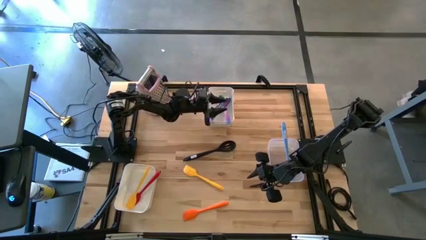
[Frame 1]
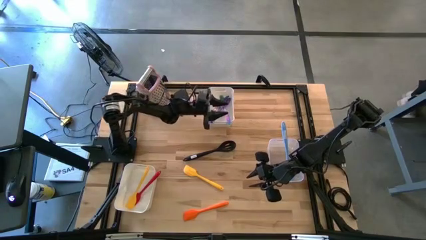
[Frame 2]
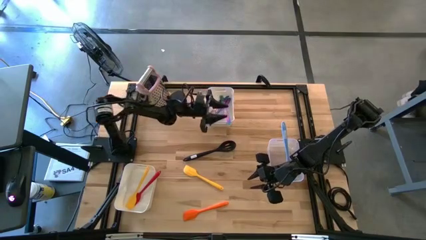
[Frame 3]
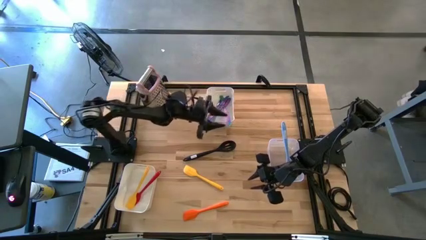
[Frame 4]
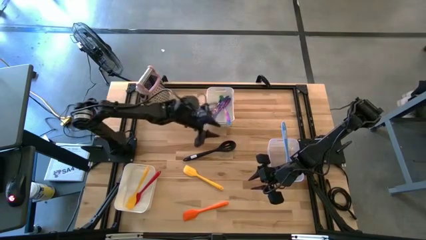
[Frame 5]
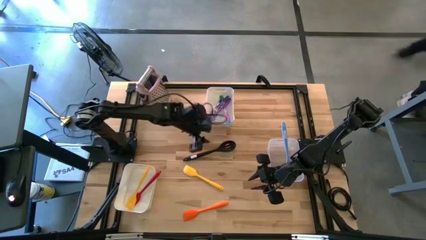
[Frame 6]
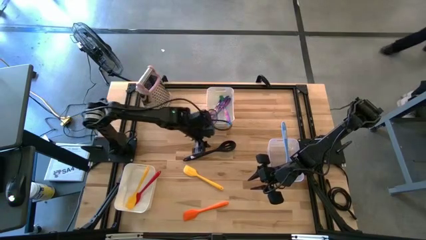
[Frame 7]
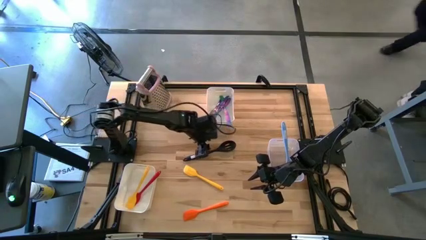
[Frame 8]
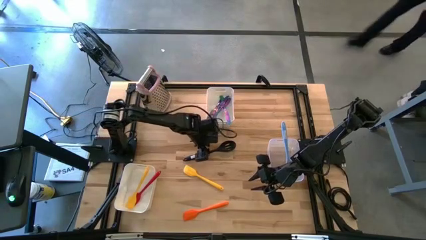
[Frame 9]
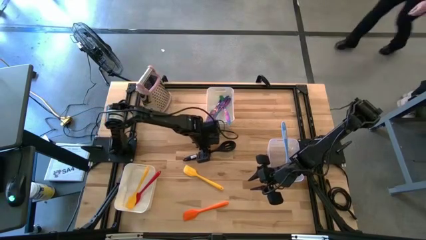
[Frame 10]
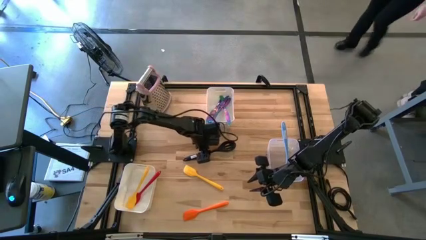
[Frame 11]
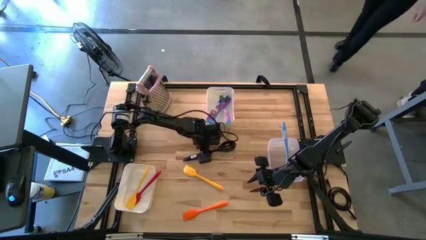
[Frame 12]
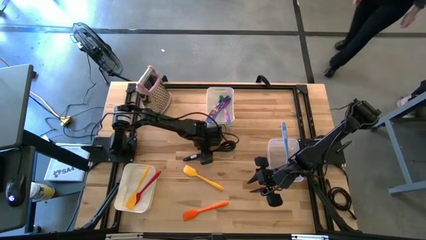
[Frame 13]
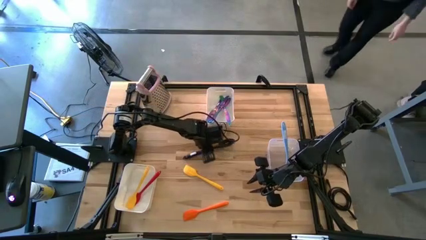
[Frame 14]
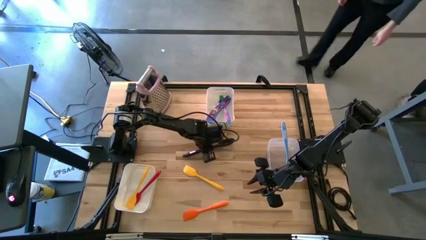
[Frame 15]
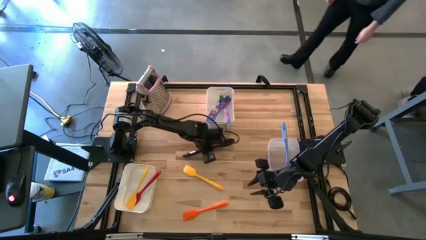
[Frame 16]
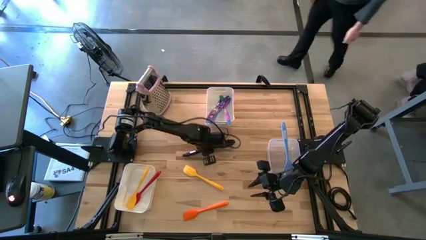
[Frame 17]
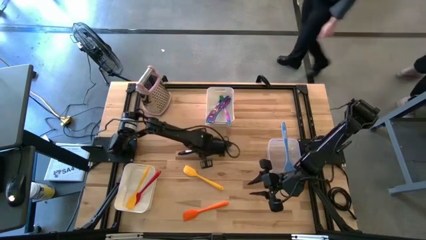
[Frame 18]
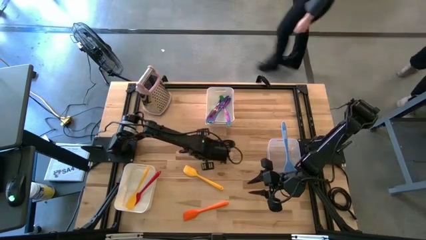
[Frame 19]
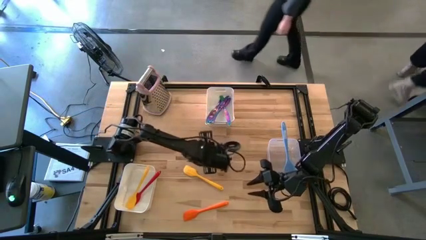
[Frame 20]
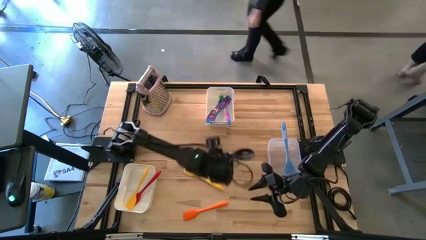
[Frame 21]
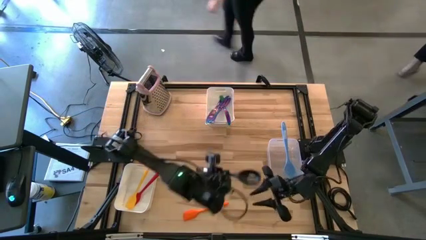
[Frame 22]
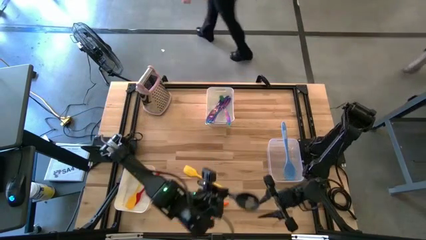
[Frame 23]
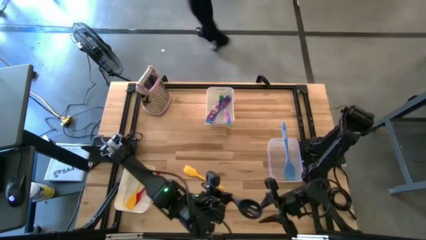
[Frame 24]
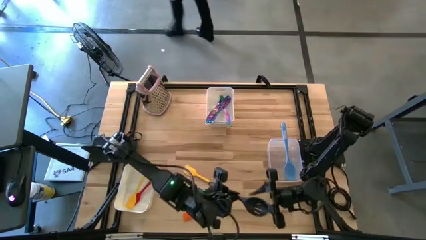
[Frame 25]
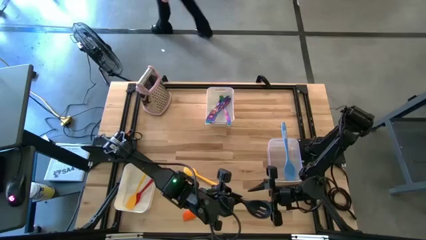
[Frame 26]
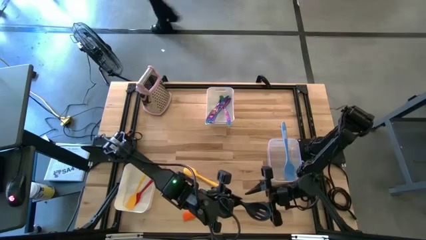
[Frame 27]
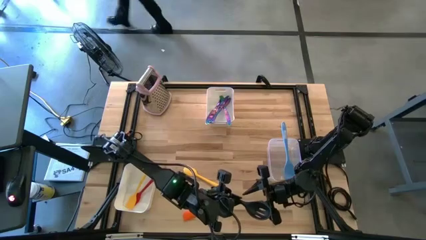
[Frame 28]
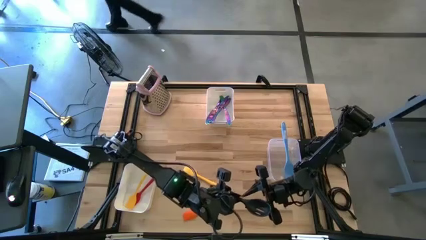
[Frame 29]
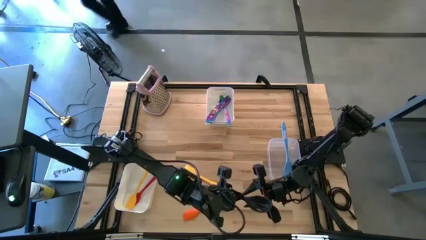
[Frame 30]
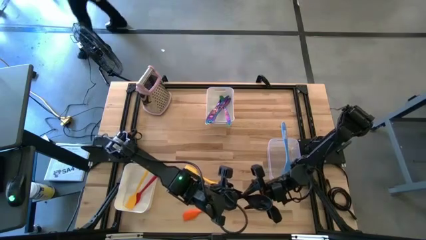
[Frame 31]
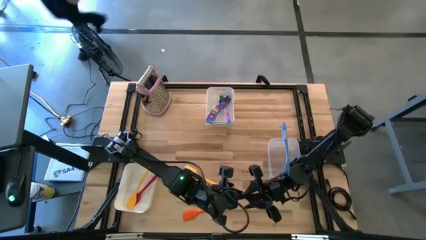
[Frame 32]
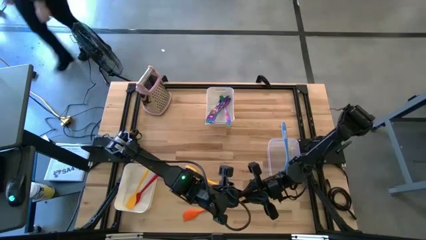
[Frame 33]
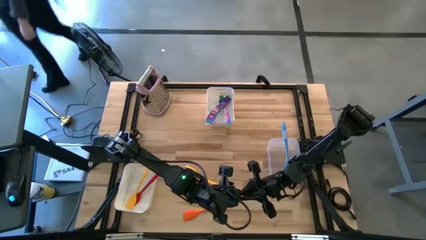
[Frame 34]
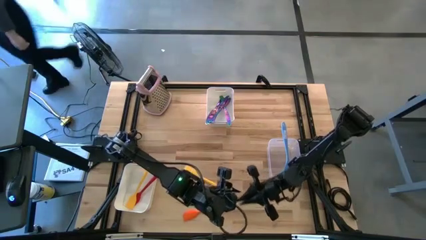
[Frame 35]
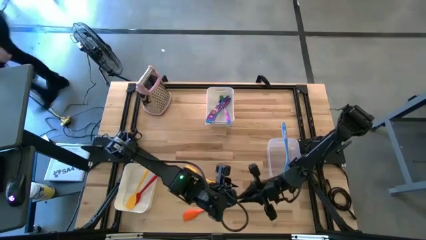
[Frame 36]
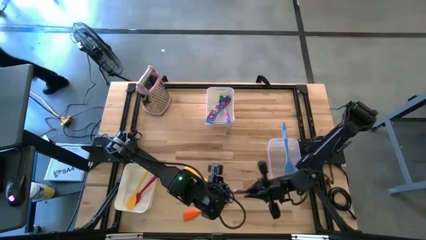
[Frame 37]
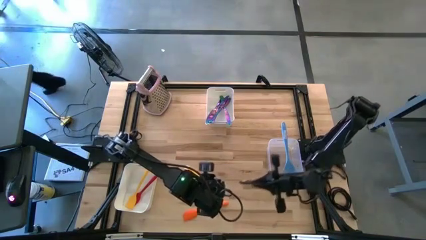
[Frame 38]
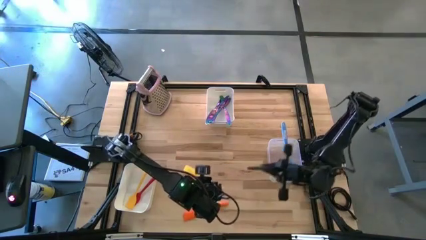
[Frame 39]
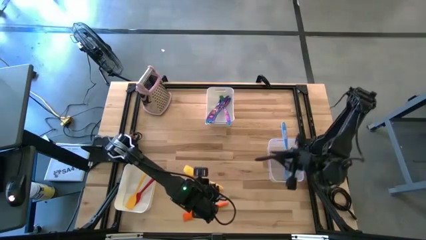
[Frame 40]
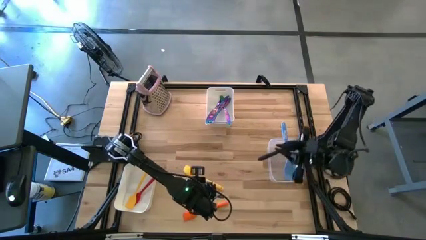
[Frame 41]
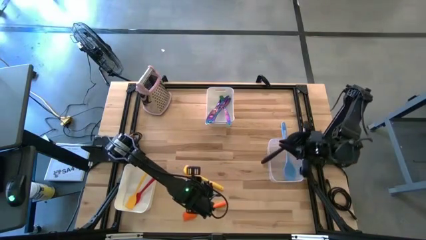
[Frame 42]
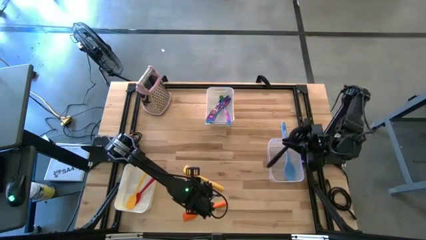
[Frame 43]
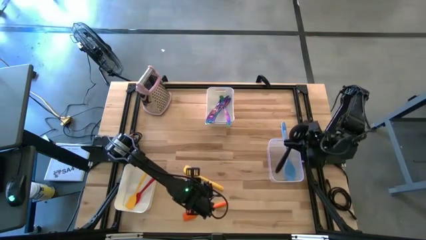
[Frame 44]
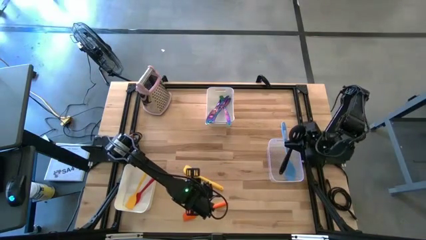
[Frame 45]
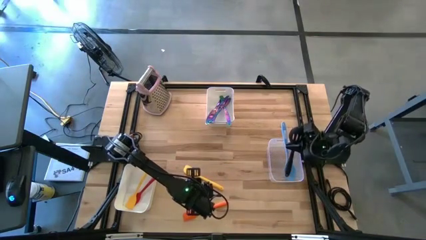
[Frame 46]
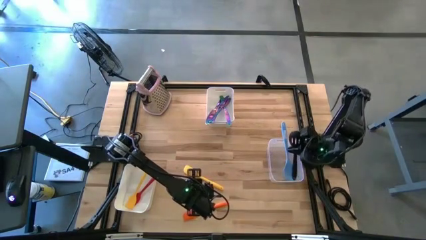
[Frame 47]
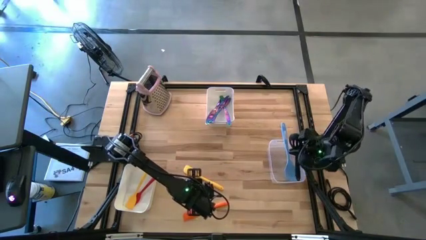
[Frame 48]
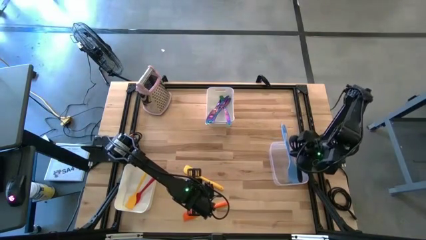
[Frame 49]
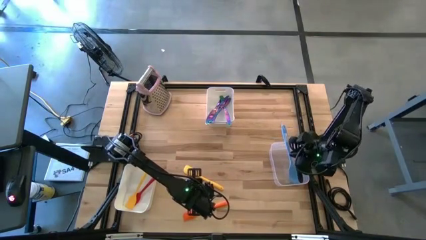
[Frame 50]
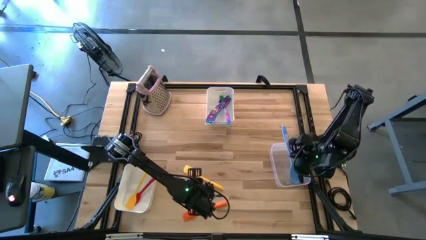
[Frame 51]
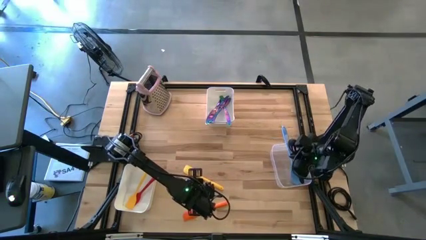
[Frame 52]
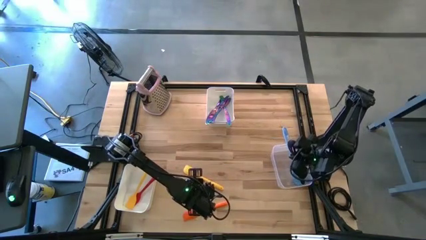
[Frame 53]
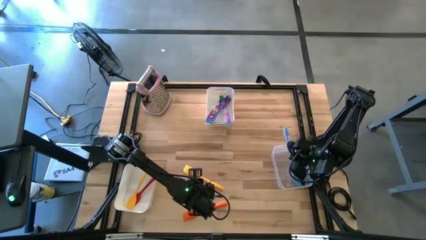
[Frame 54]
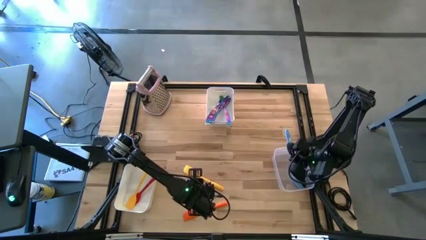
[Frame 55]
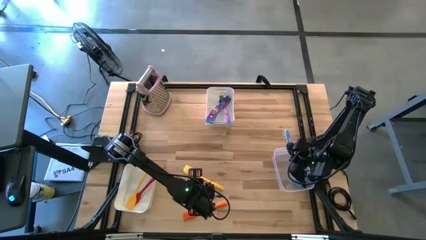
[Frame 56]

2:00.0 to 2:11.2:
Task: Pick & Place Kitchen Items
Put the black serving spoon into the transparent bin
